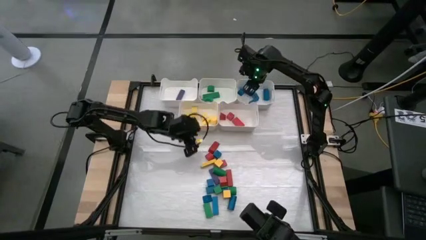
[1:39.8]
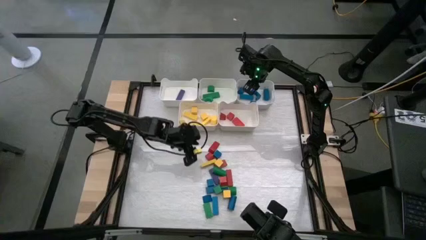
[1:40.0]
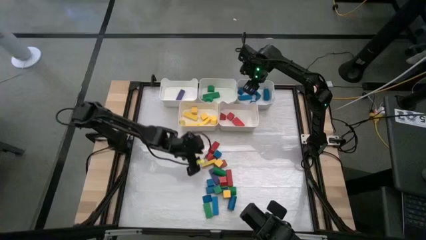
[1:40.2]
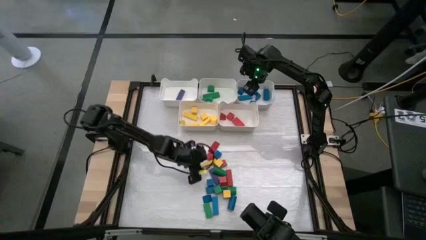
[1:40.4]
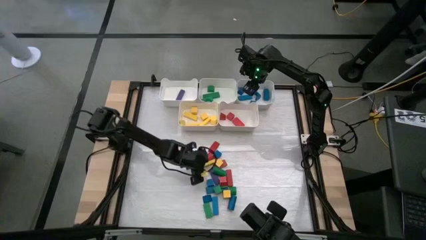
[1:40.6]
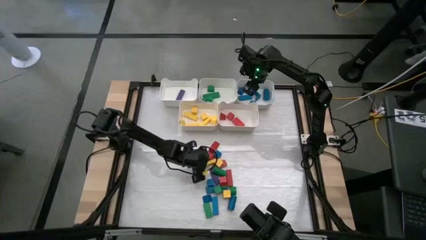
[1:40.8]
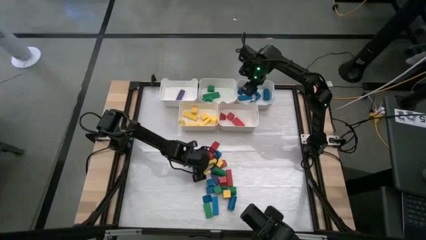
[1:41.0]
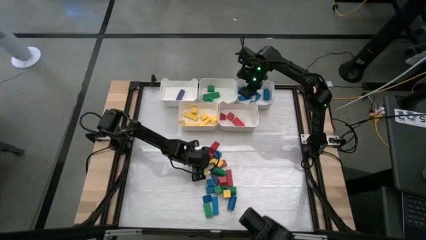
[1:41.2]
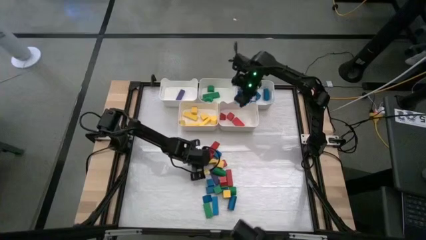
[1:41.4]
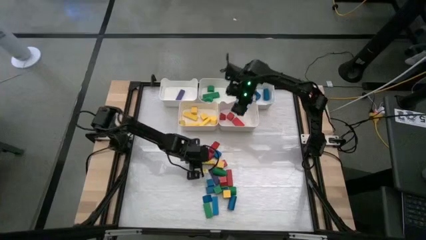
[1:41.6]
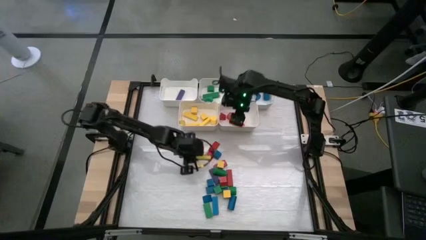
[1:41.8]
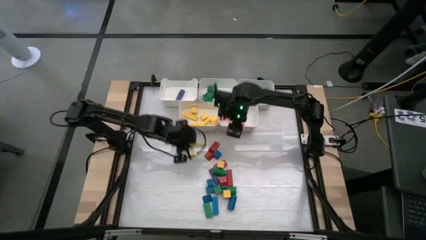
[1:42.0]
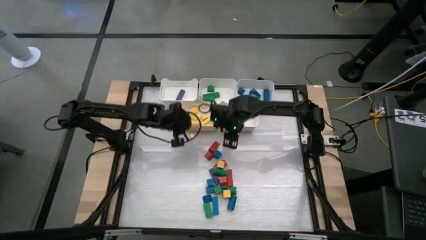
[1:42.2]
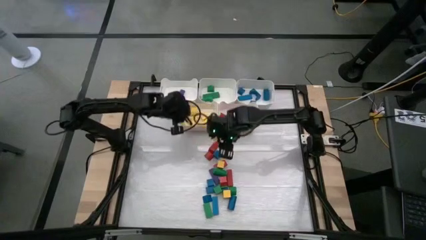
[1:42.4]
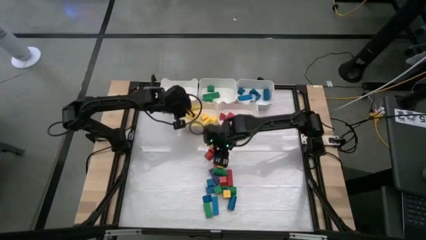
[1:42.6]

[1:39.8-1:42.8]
Task: Sort blocks
Put the yellow block into the bottom left bin

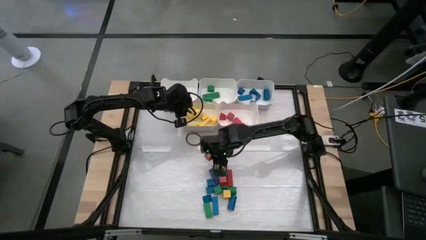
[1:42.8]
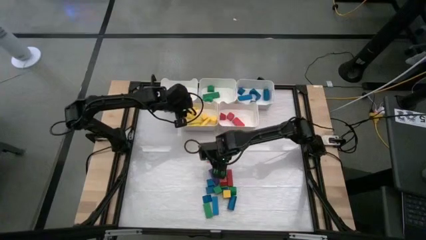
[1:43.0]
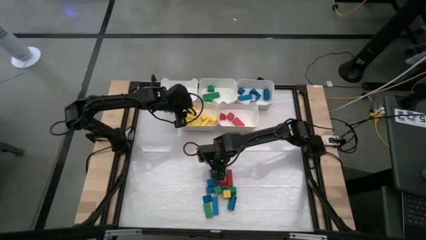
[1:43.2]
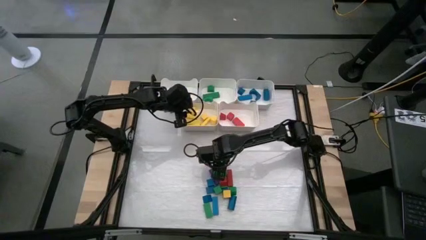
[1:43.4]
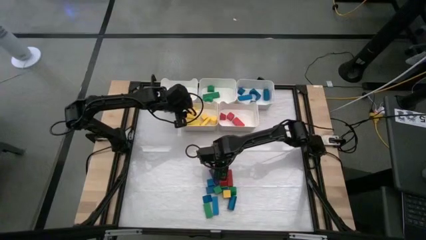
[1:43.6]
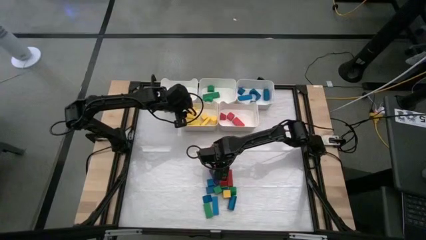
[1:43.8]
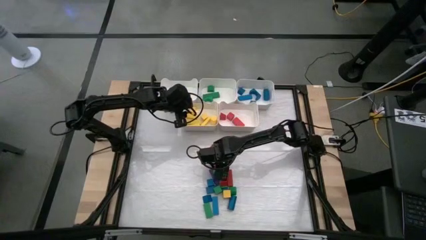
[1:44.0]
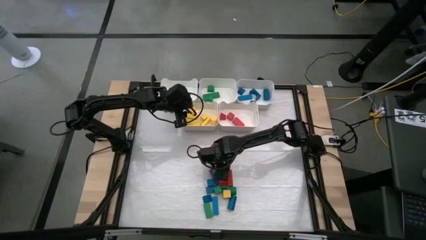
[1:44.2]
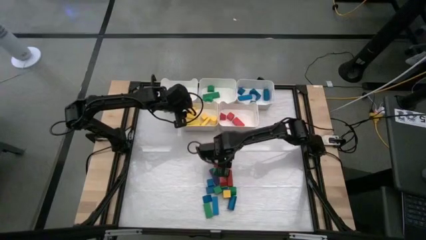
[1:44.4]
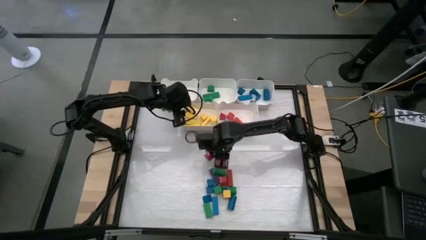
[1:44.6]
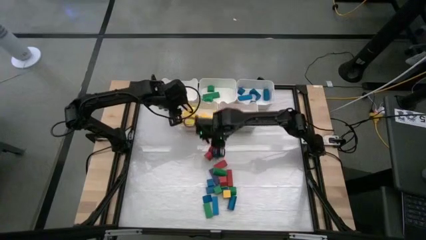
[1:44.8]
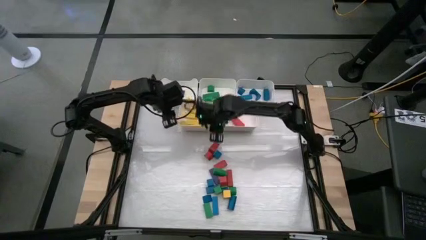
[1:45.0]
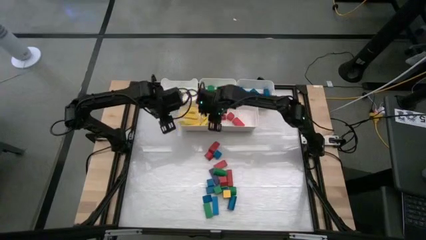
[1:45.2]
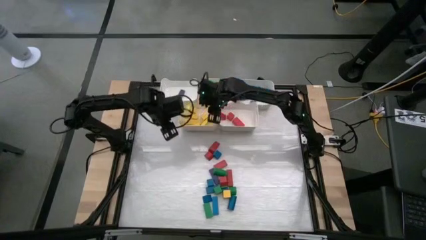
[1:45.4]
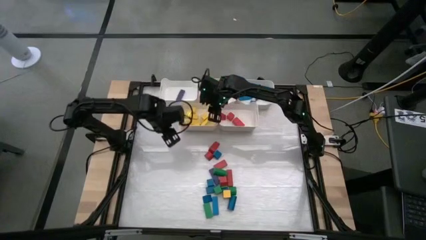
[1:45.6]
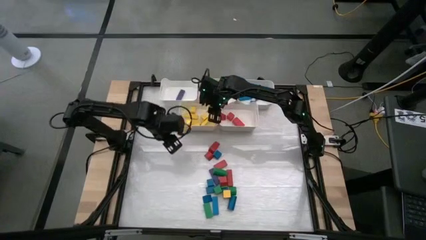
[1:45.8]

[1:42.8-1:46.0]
Put the yellow block into the bottom left bin

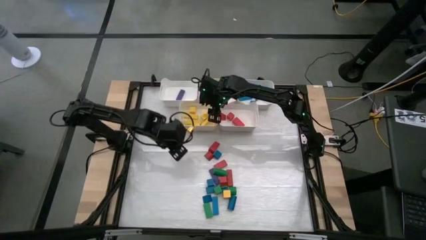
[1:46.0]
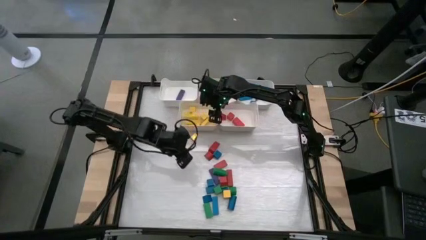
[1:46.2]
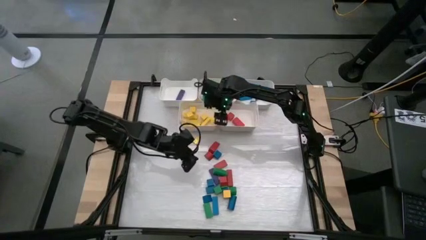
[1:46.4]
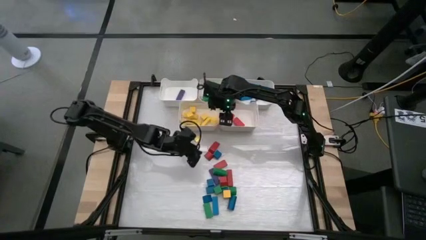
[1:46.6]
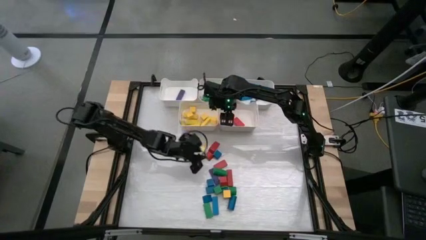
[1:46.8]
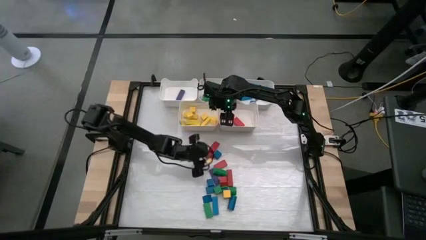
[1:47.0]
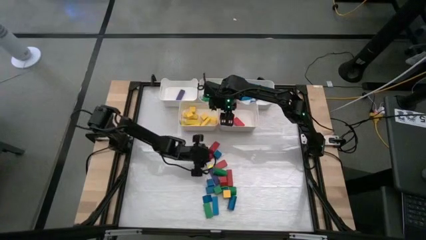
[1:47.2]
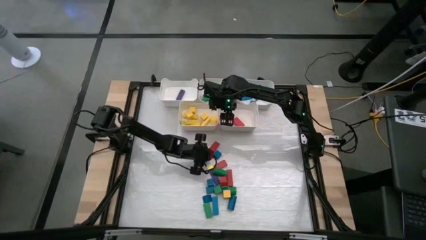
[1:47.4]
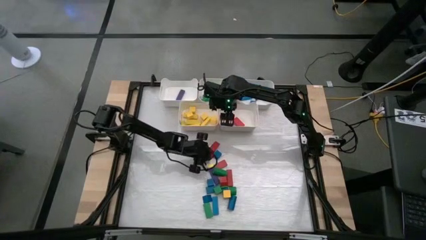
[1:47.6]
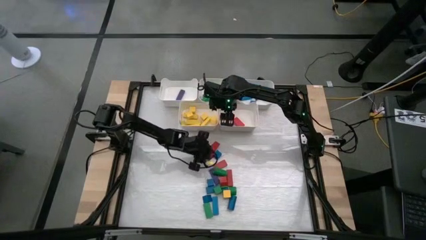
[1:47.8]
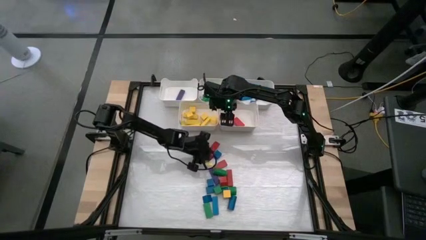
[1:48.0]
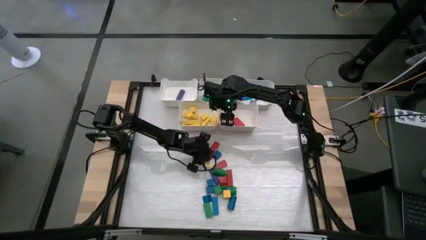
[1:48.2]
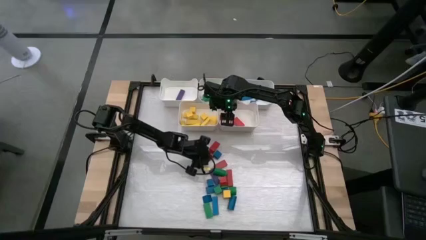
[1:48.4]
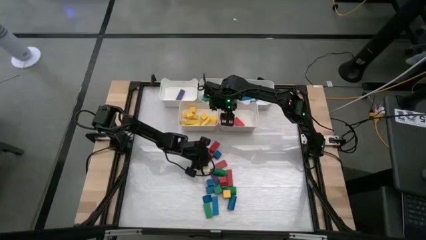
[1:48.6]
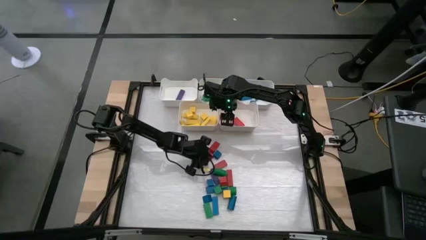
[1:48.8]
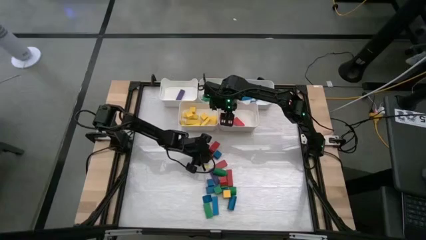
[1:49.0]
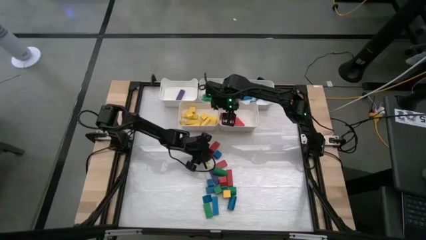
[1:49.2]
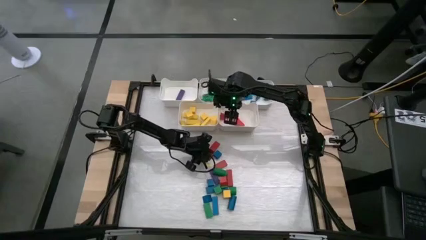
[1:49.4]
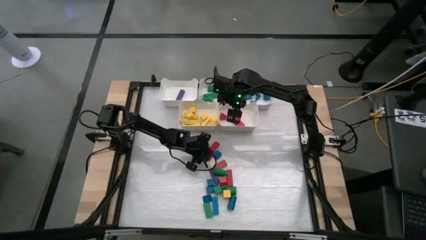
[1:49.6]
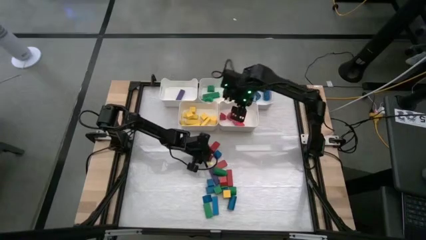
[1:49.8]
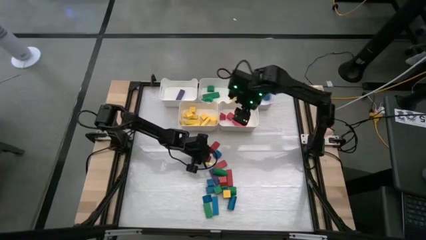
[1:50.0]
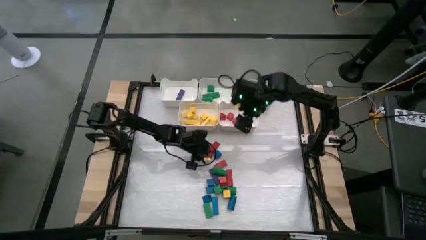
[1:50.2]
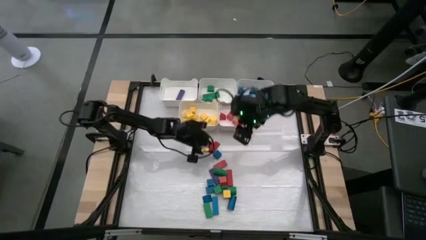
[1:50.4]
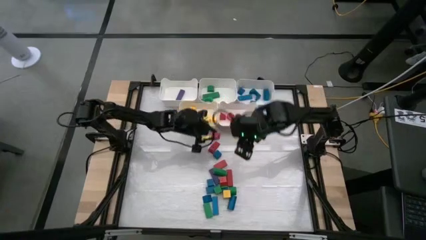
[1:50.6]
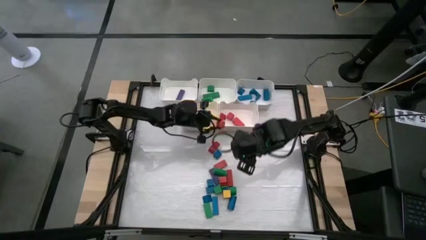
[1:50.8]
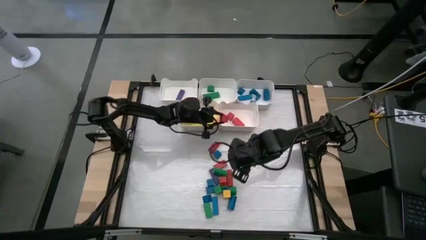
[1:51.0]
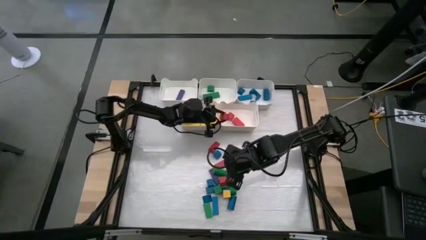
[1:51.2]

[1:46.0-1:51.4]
Put the red block into the bottom right bin

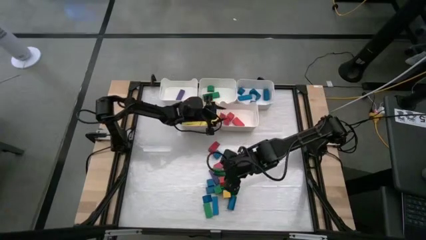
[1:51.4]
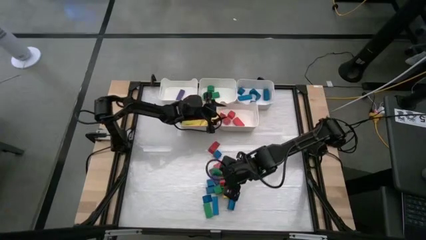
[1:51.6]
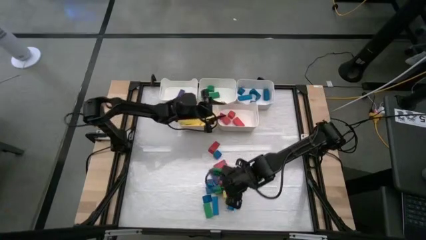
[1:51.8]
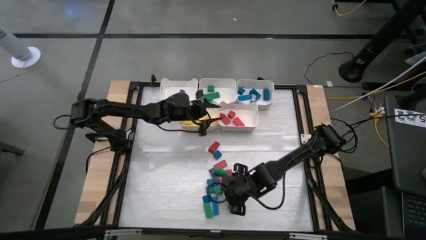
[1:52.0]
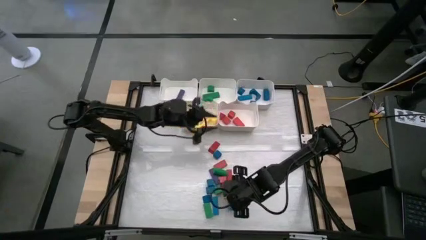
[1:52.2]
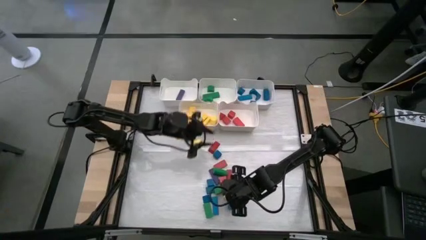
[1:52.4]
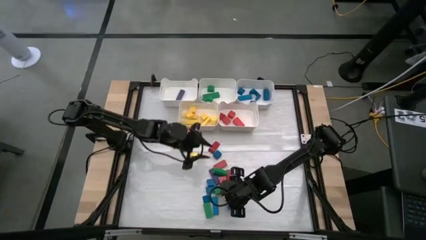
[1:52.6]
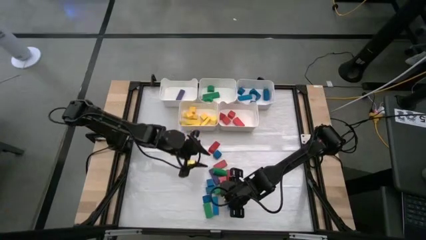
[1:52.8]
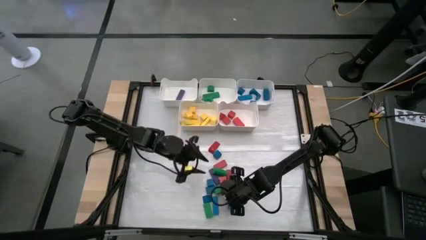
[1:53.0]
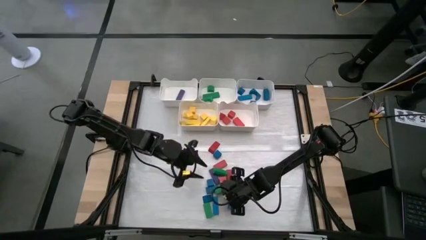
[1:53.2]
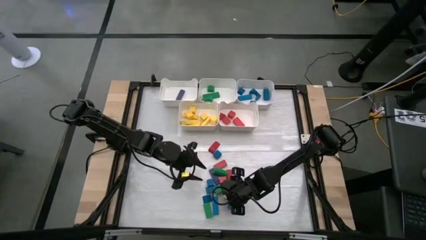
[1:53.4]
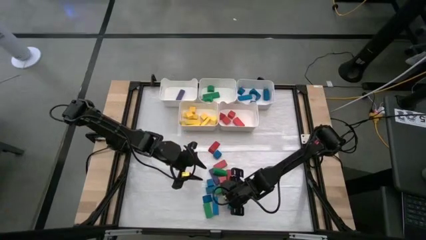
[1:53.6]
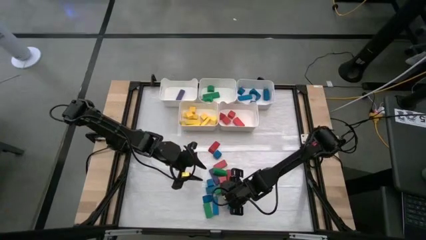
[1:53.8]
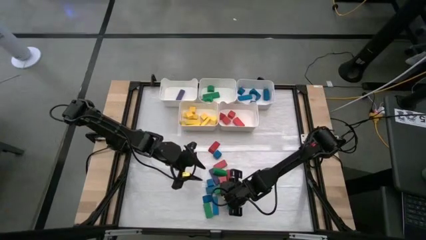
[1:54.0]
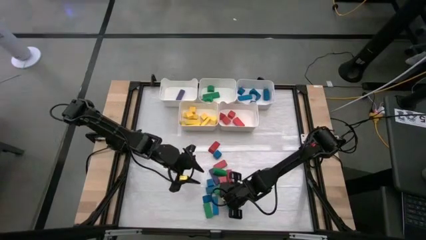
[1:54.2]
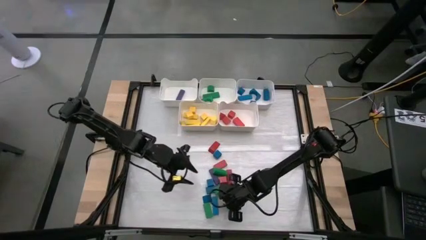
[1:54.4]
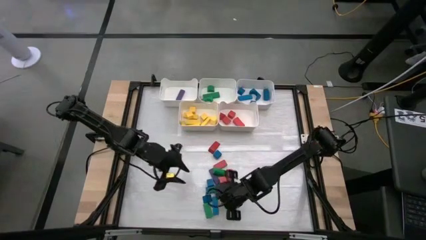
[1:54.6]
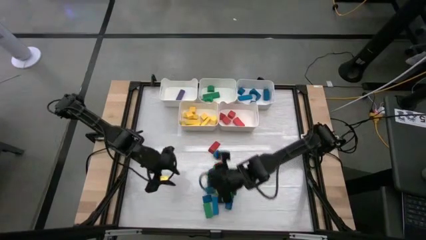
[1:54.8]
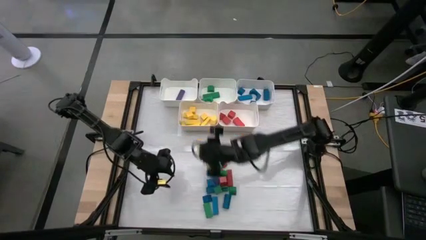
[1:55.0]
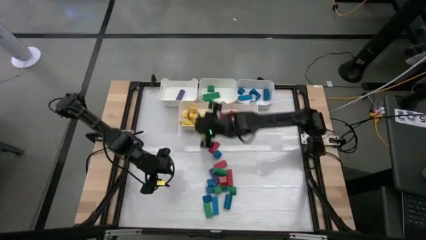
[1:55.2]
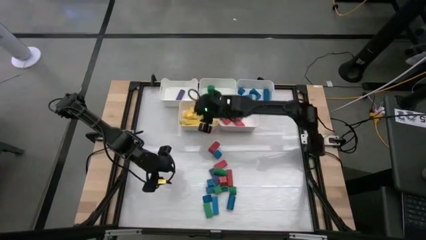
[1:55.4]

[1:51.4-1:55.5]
Put the yellow block into the bottom left bin
